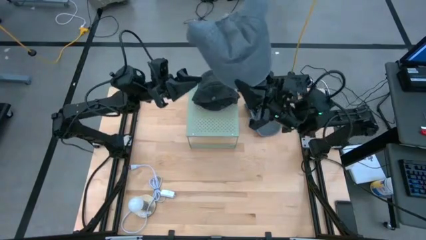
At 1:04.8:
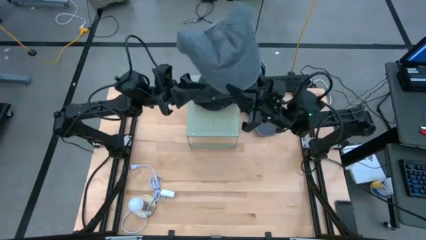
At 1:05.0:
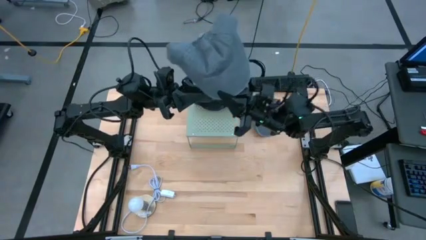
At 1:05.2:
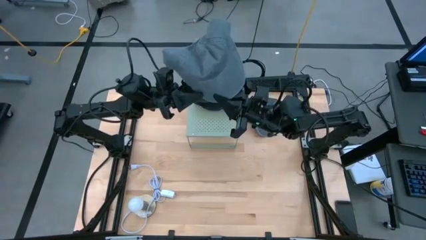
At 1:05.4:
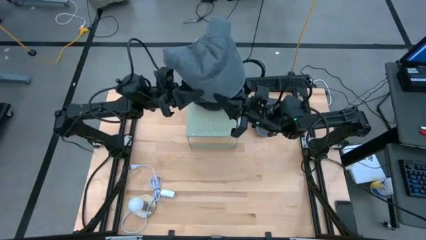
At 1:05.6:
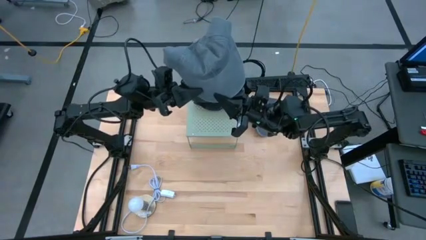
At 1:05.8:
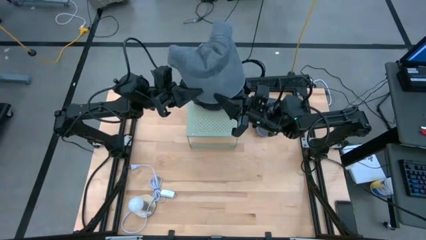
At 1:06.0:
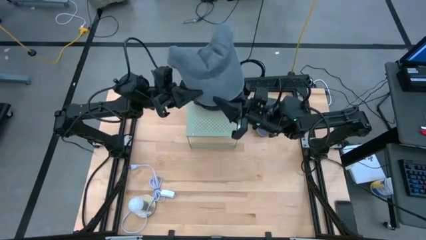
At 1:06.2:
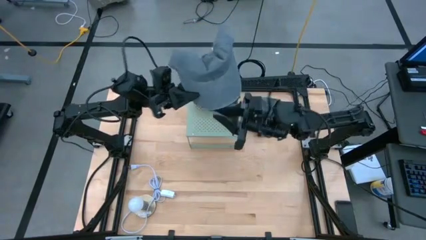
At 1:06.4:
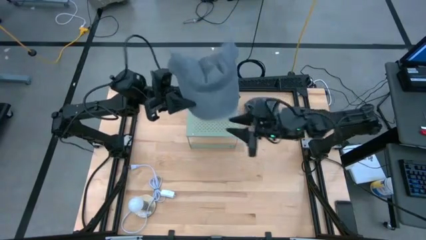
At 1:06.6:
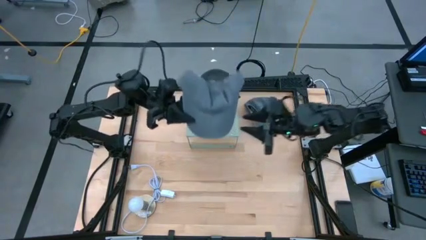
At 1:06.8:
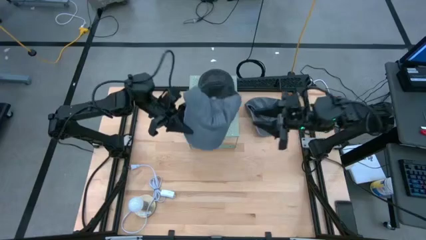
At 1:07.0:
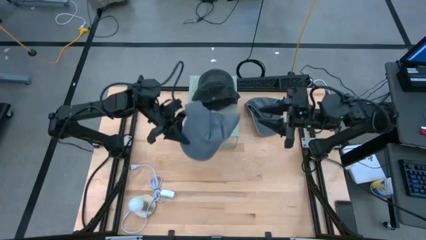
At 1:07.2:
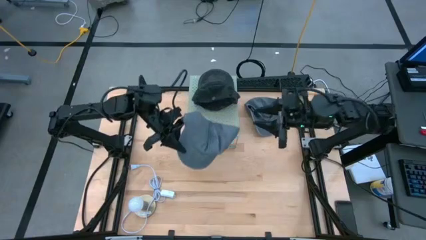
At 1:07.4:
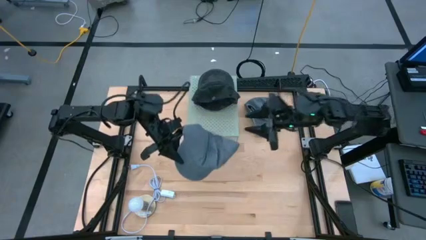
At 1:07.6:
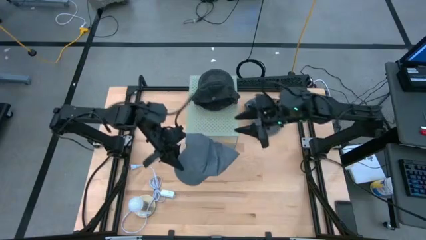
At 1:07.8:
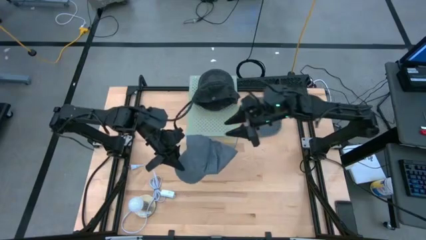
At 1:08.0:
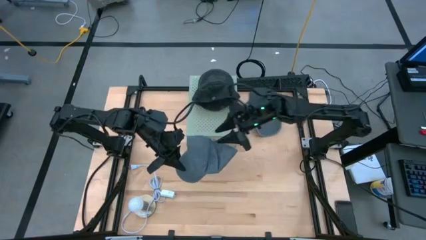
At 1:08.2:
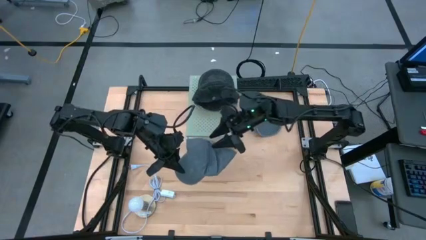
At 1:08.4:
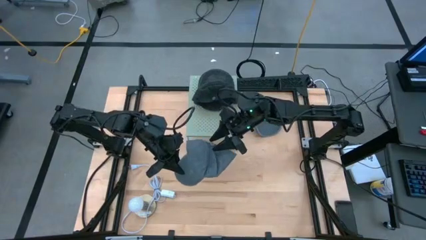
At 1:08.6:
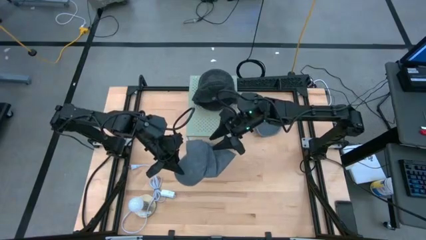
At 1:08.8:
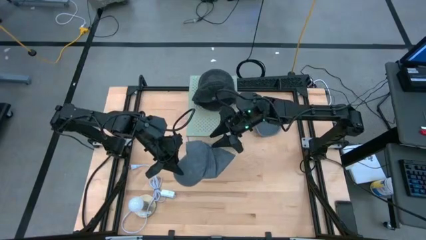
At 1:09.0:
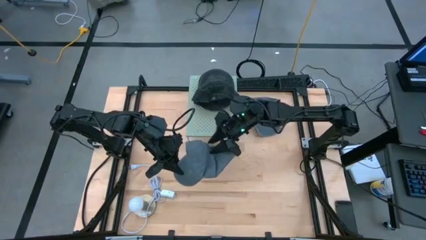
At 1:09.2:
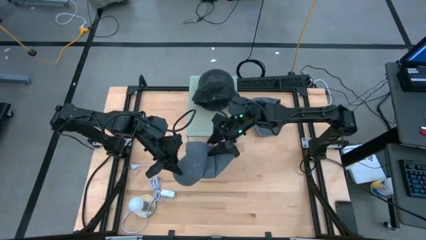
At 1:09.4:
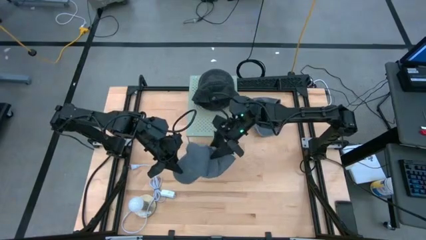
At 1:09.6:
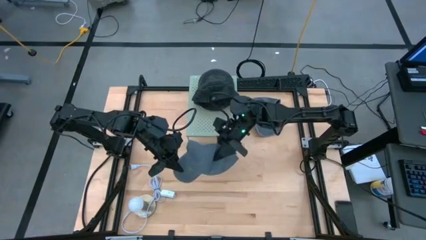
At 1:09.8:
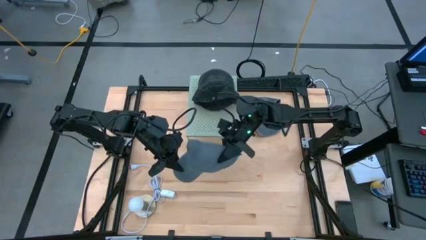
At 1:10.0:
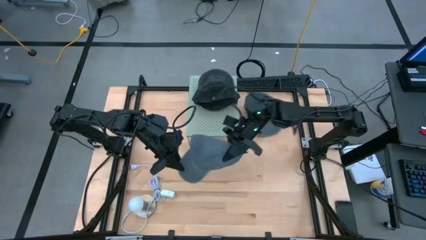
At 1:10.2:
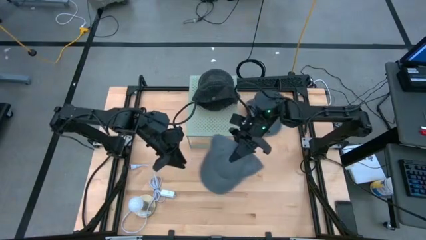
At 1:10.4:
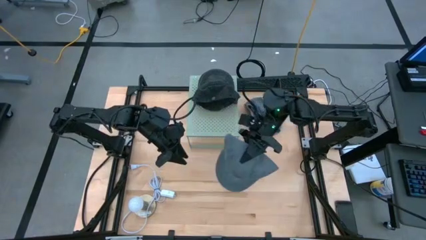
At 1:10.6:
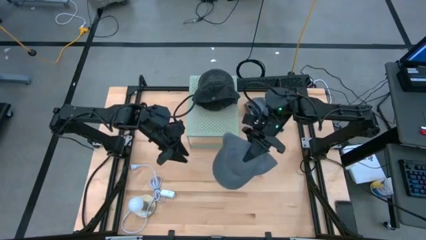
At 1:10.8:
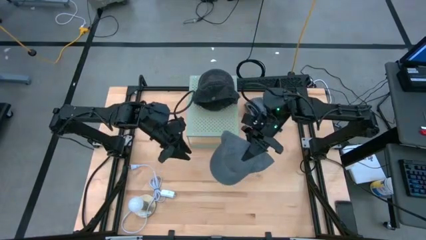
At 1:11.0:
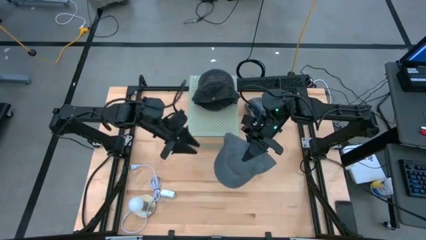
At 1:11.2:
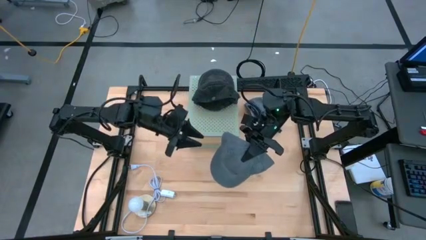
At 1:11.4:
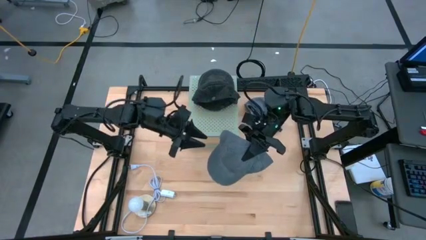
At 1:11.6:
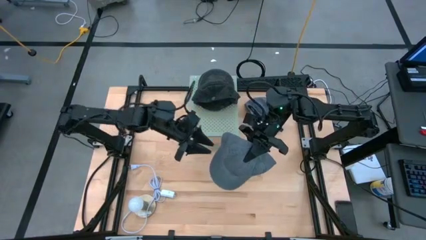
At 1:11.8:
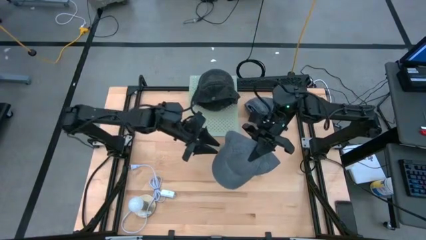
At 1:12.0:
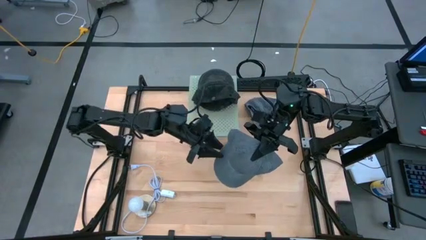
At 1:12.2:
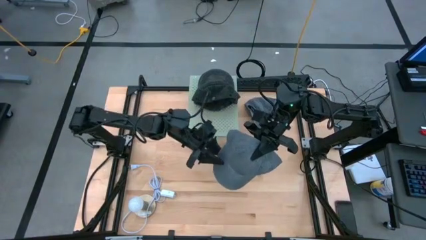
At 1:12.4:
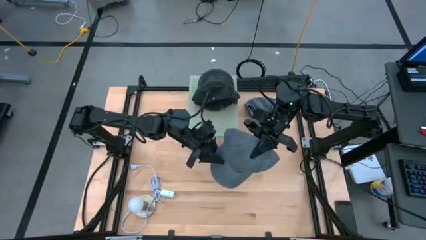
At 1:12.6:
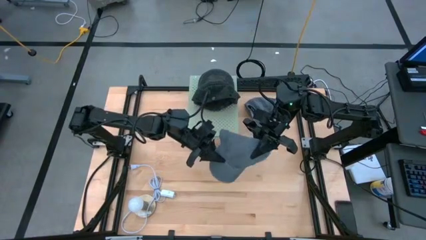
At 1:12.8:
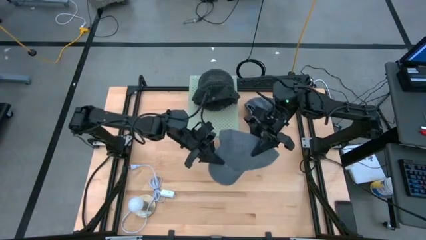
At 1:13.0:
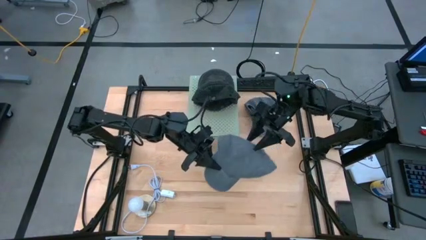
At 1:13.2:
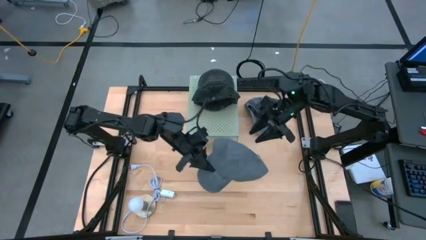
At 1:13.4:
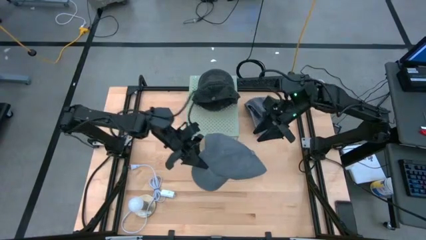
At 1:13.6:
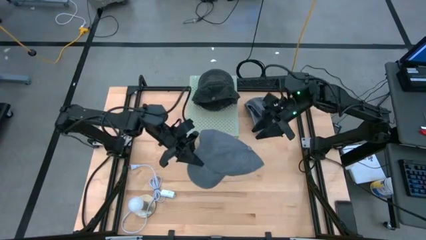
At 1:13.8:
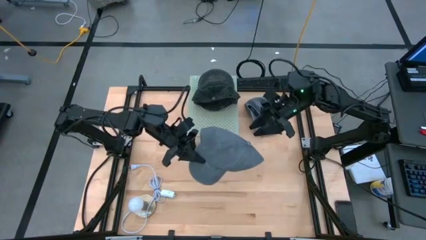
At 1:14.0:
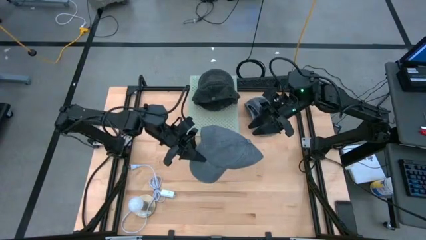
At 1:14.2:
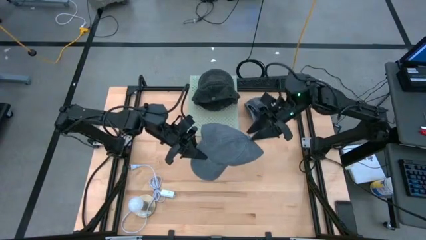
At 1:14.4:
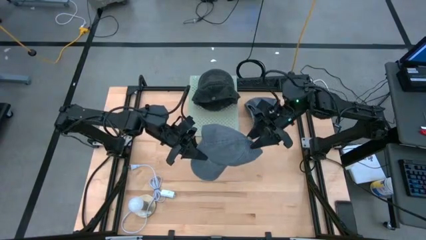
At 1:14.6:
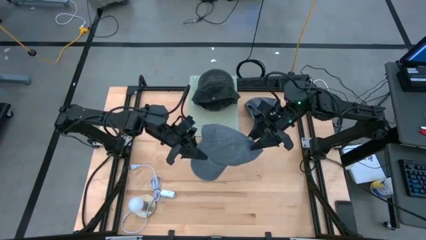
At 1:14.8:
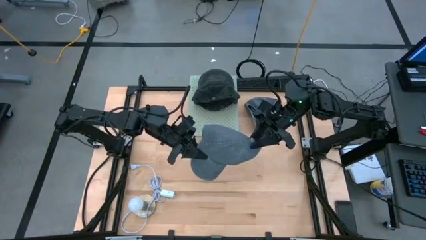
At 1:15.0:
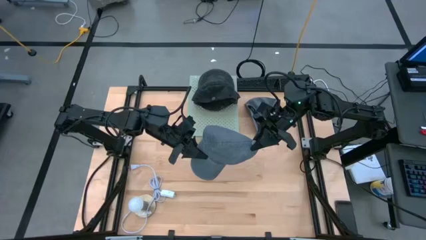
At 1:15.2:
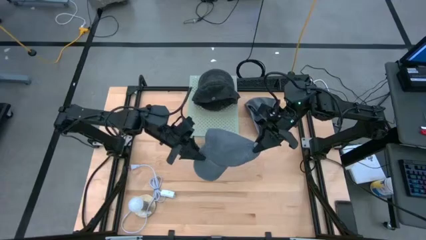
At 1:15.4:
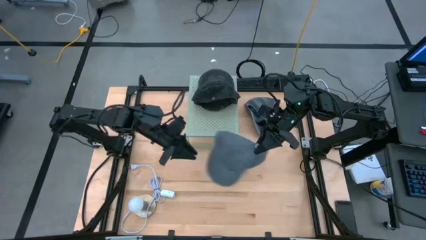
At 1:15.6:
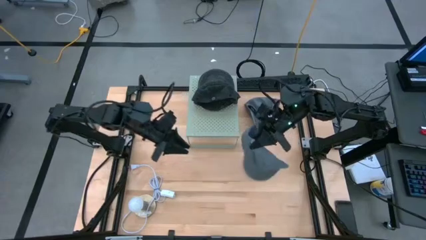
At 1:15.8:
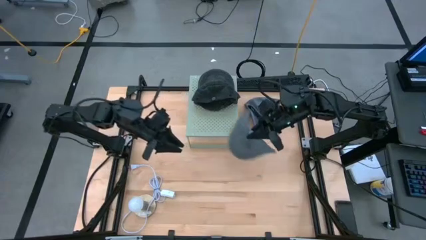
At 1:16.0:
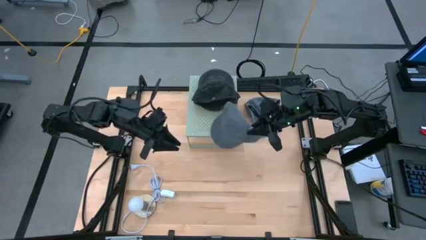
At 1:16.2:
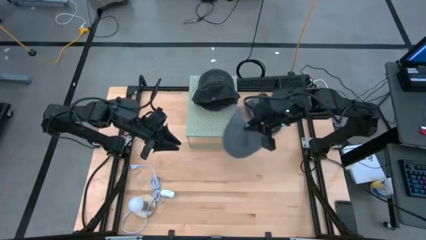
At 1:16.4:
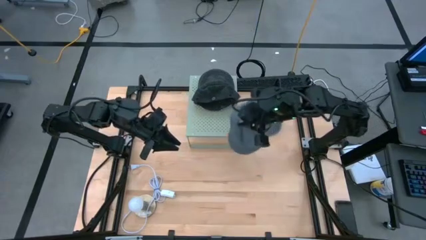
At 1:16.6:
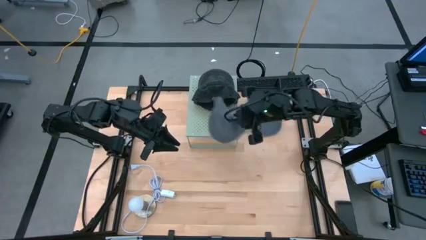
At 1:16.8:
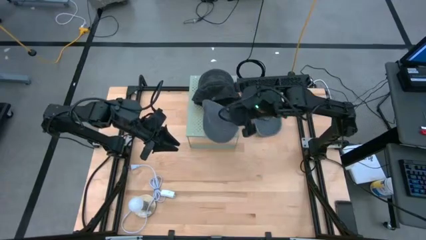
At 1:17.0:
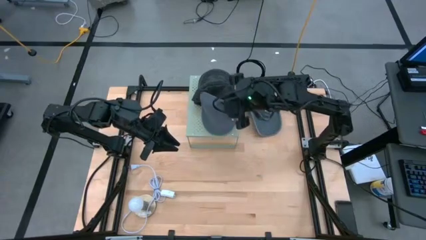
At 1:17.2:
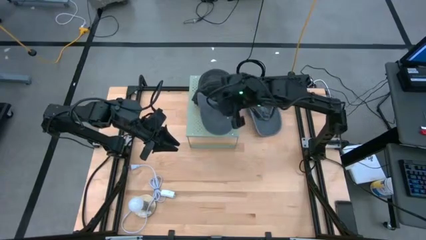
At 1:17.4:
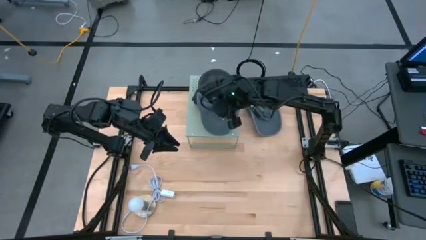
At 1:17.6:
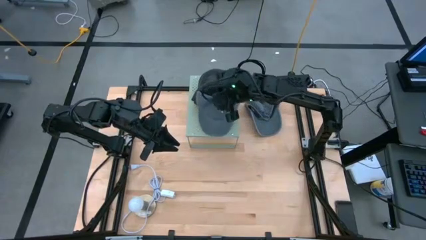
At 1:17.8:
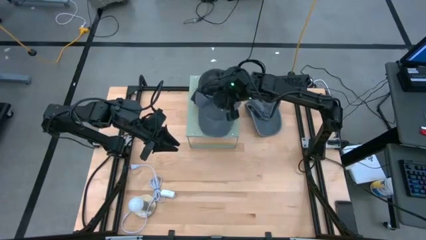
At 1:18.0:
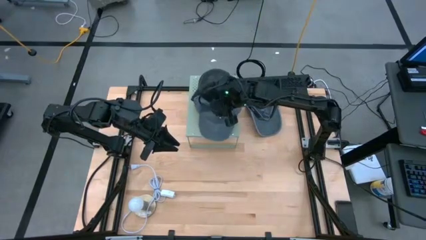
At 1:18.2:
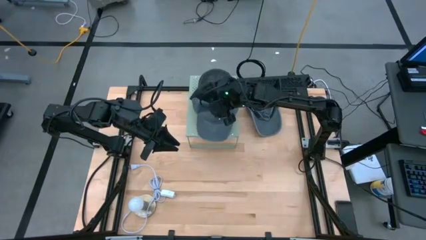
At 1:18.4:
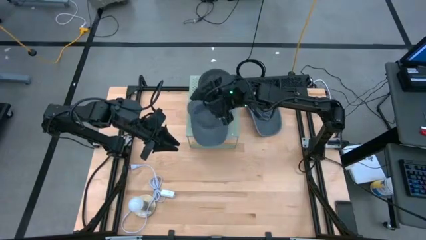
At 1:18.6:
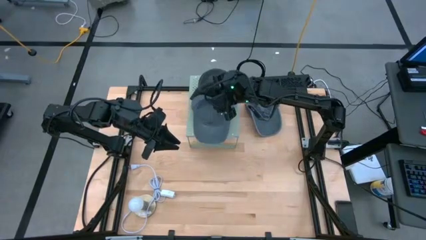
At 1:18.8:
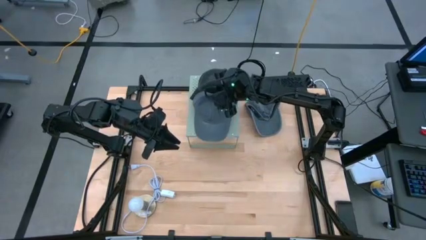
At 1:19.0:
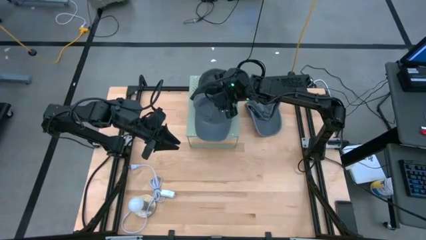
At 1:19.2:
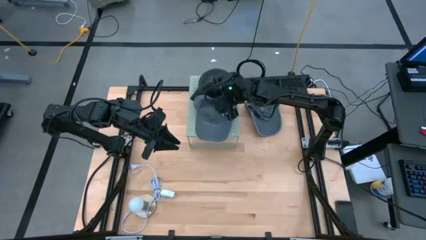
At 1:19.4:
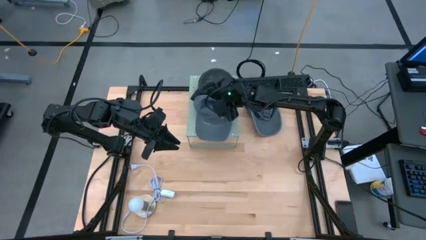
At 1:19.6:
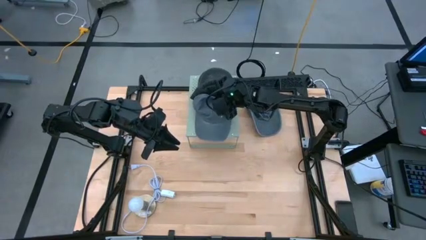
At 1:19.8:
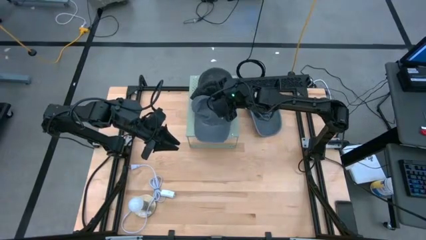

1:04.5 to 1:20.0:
Task: Pick & Place hat
Put the left gray cap on the shelf
